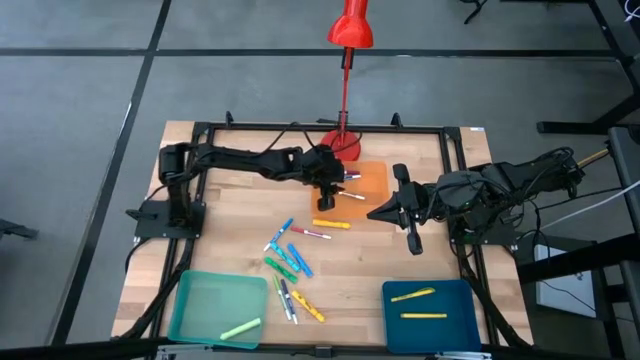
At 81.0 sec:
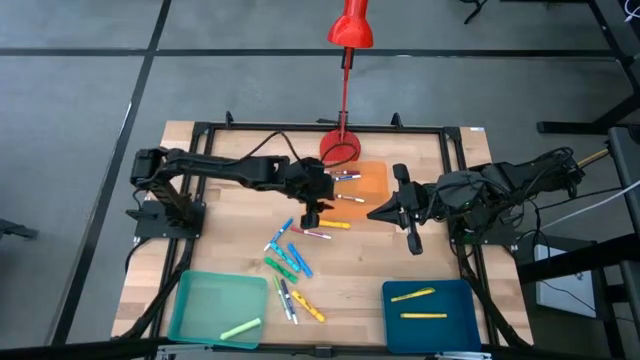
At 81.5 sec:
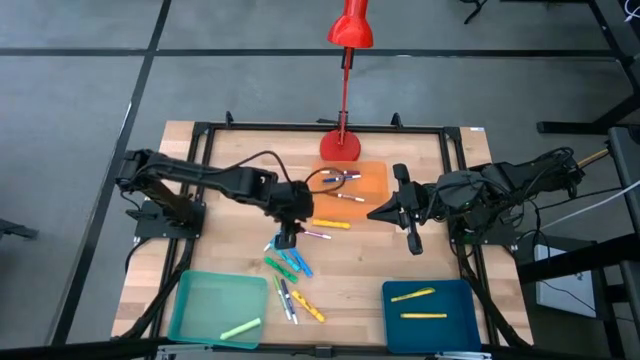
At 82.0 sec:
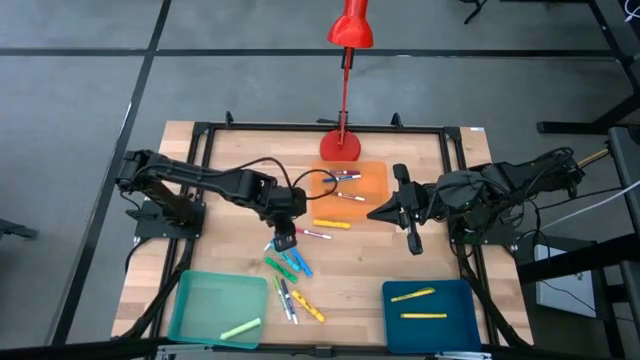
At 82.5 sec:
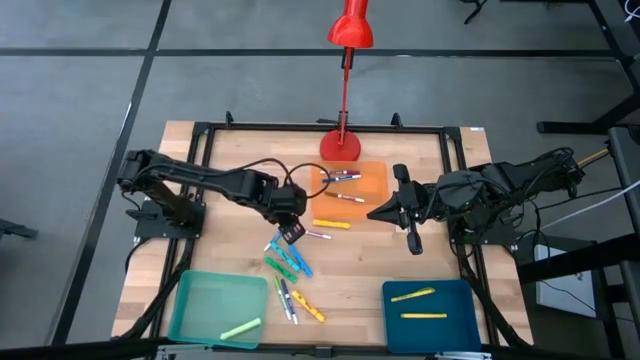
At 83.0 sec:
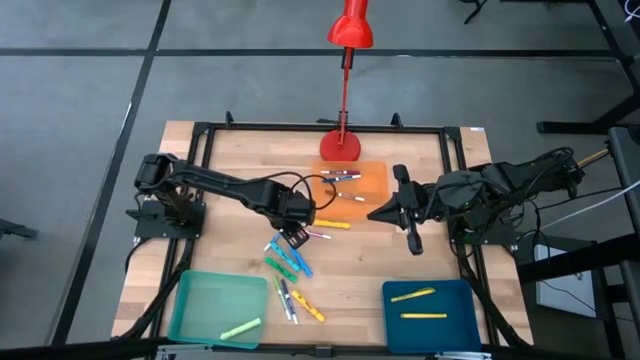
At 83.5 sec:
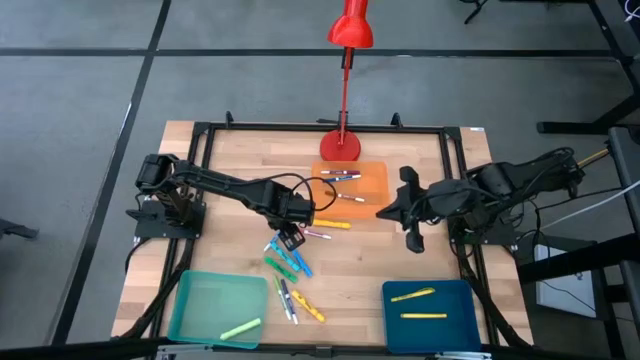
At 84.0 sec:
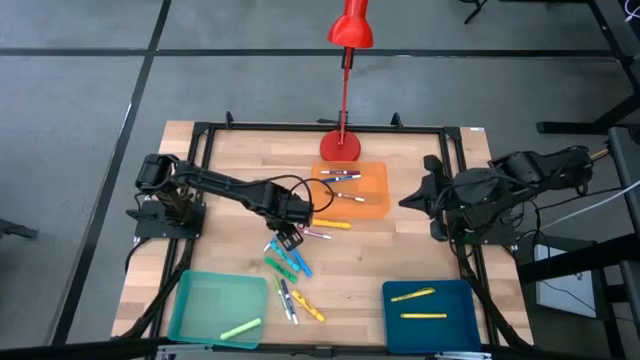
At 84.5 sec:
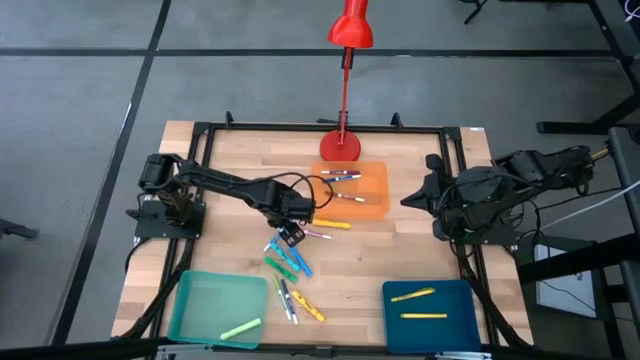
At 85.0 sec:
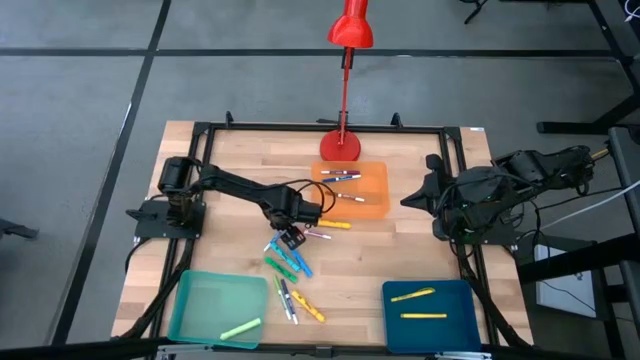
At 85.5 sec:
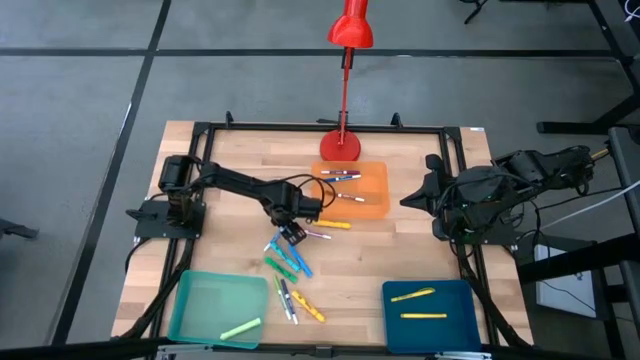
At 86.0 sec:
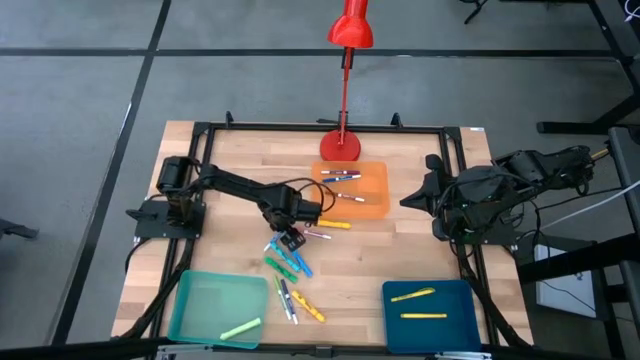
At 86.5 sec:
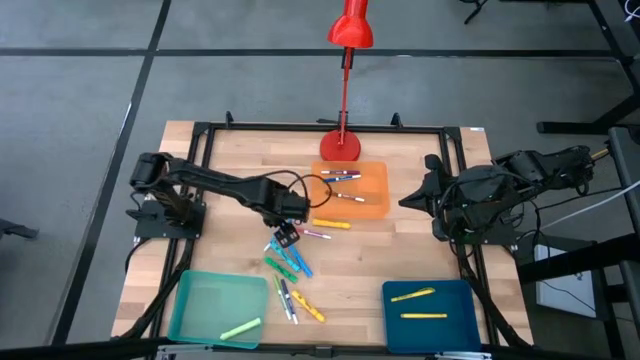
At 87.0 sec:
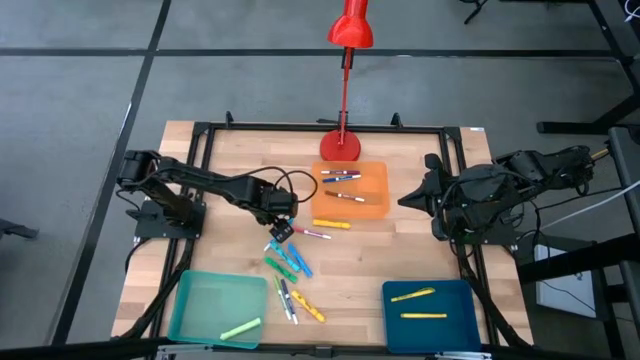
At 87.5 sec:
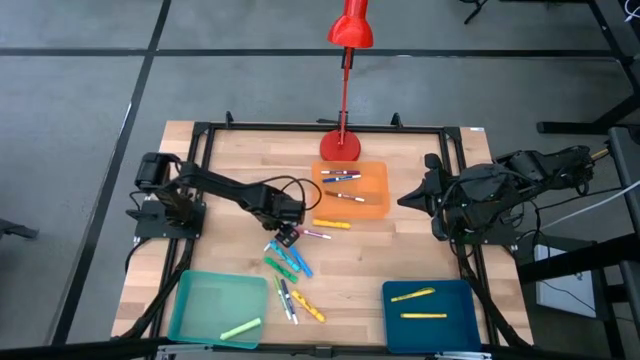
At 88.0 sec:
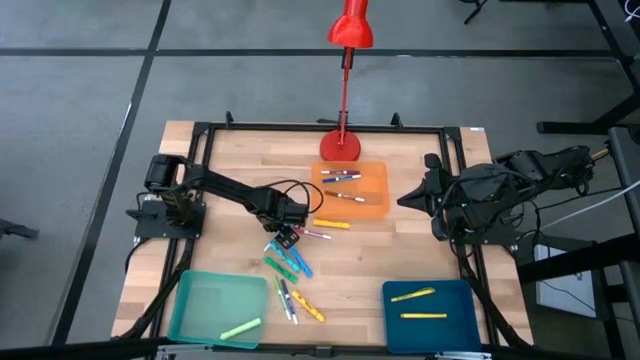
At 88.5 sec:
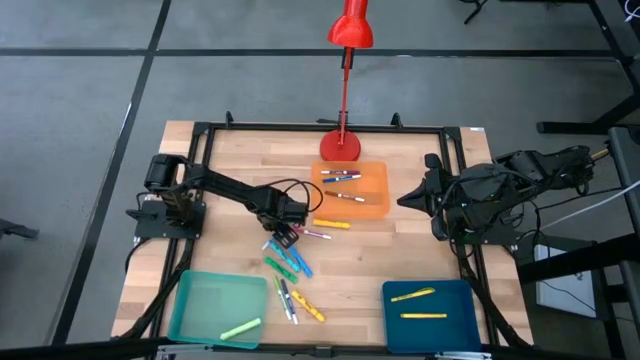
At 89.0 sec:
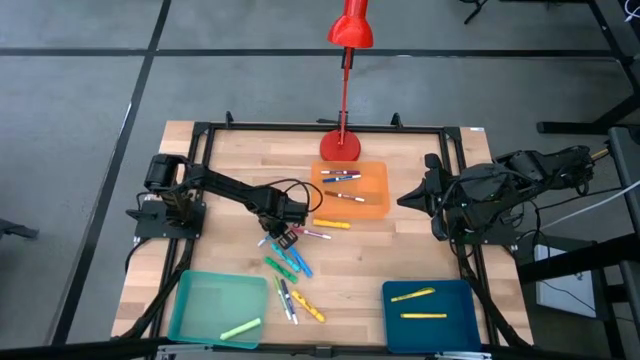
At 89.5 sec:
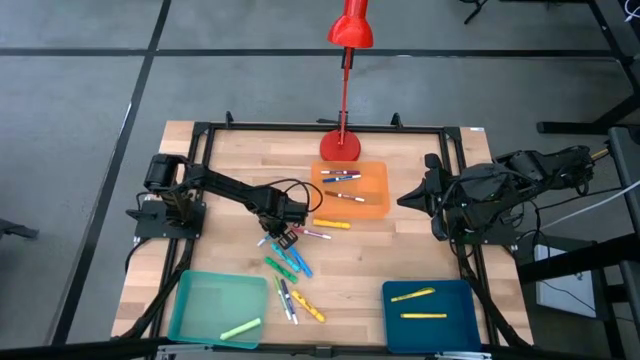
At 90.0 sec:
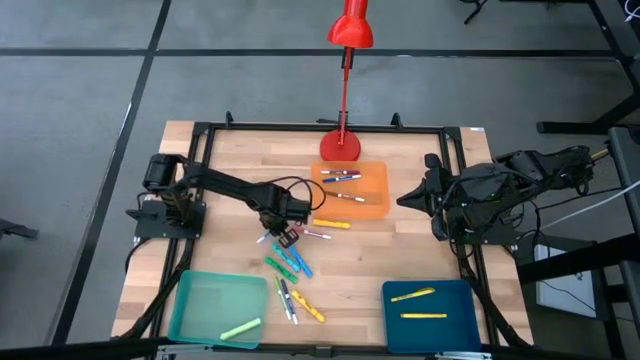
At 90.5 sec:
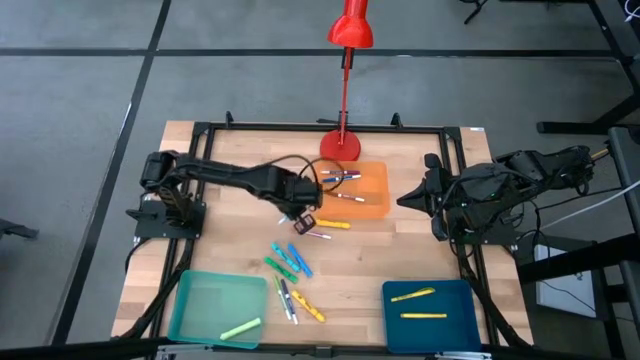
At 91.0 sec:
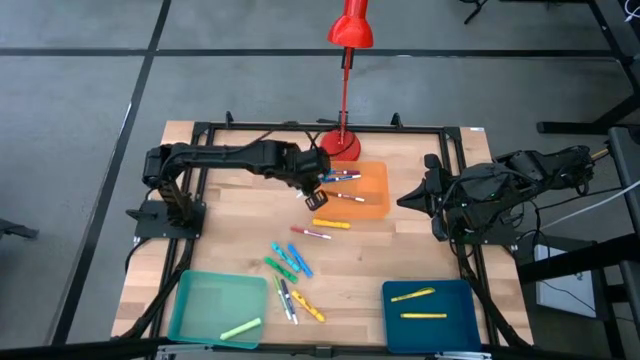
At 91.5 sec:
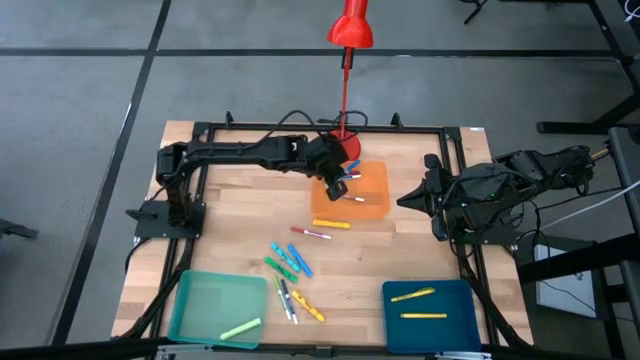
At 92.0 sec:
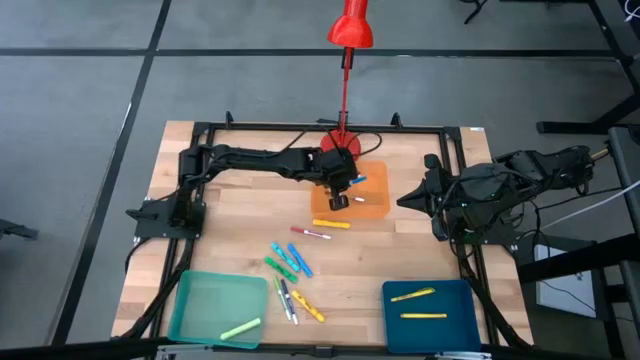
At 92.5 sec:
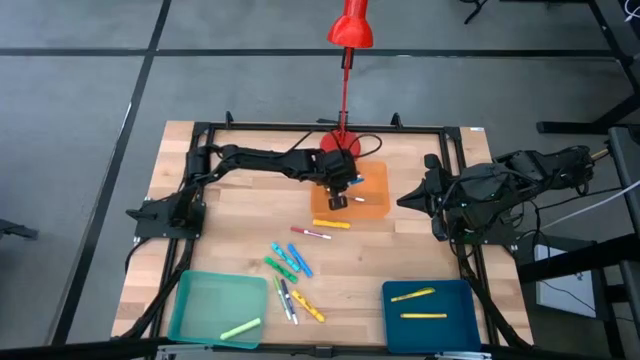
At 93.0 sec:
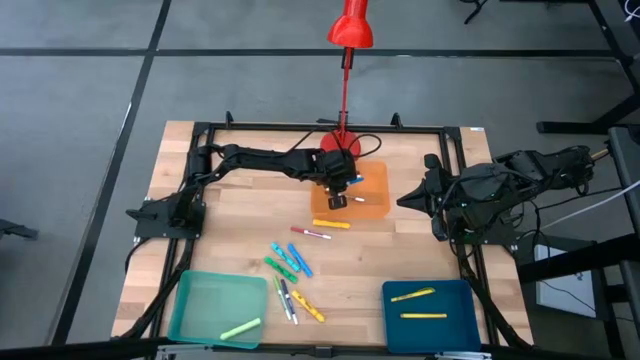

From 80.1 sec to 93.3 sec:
Task: Pick & Place Markers
Put the light blue marker pen into the orange bin

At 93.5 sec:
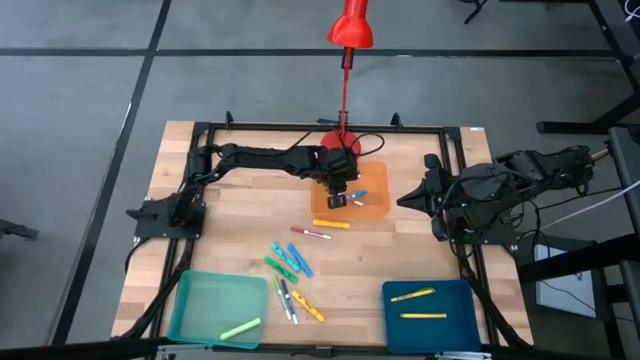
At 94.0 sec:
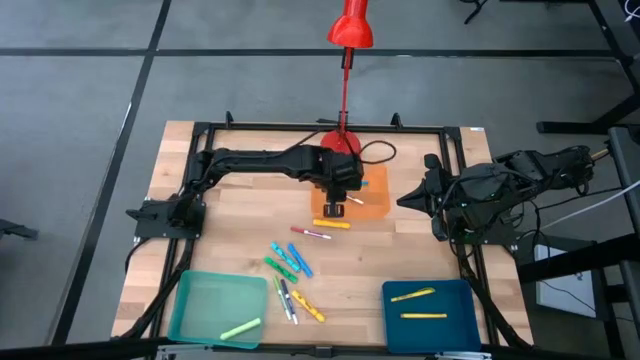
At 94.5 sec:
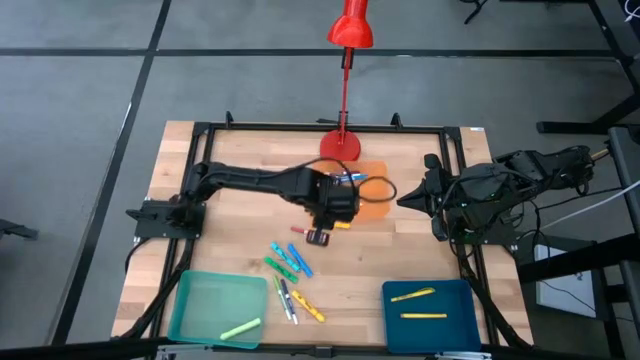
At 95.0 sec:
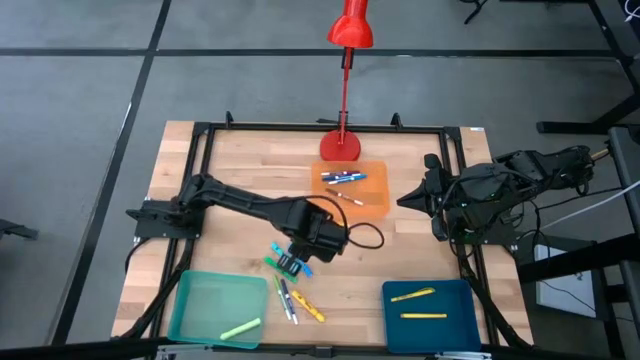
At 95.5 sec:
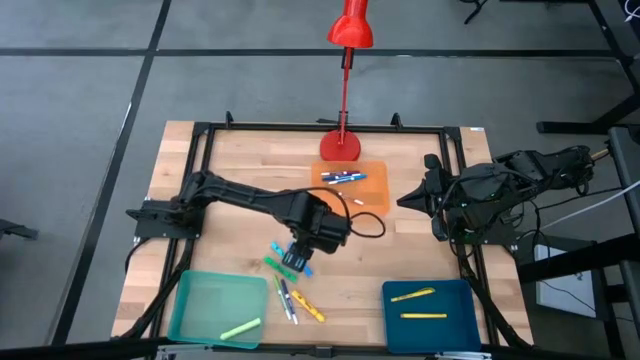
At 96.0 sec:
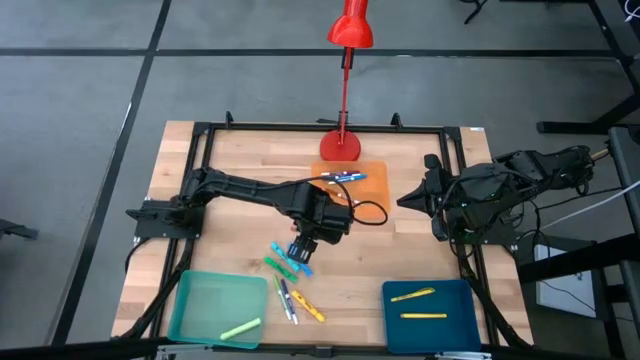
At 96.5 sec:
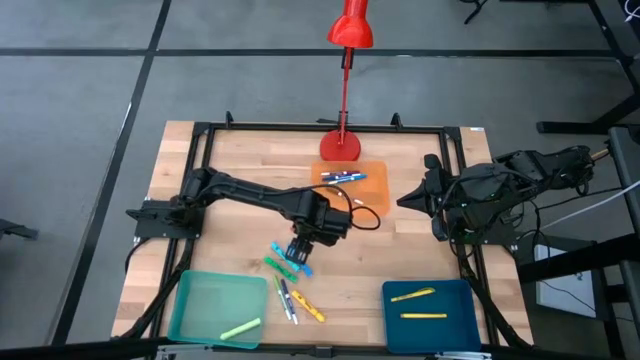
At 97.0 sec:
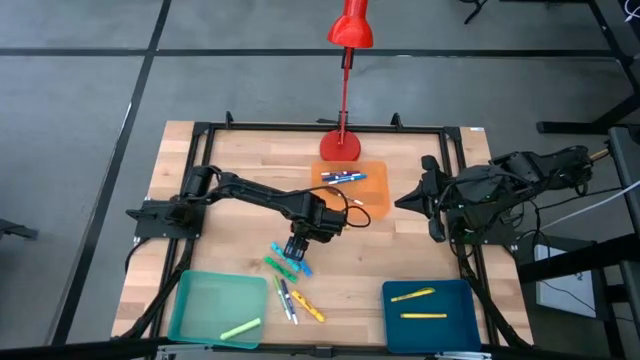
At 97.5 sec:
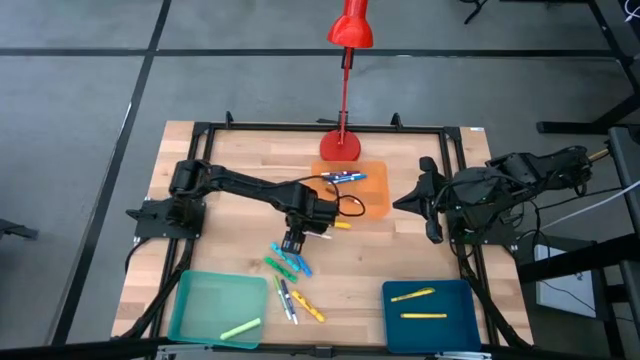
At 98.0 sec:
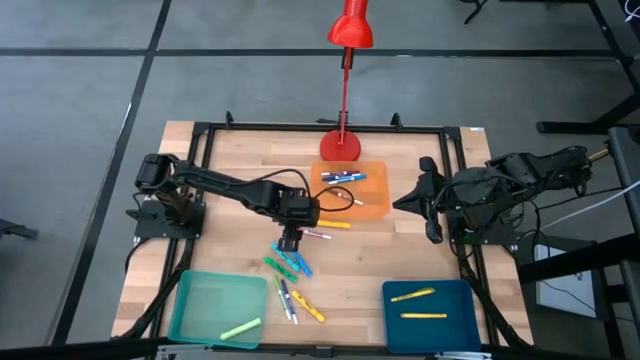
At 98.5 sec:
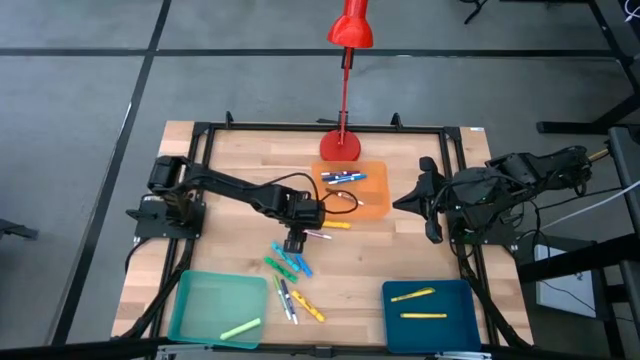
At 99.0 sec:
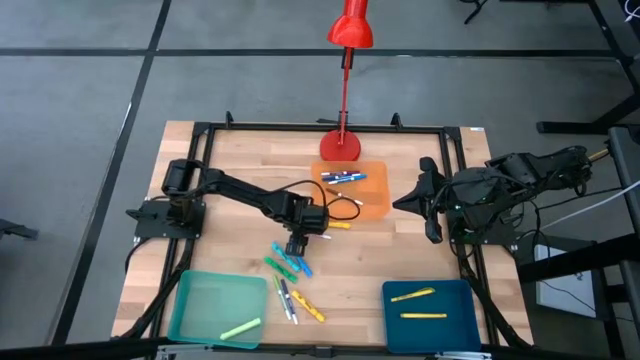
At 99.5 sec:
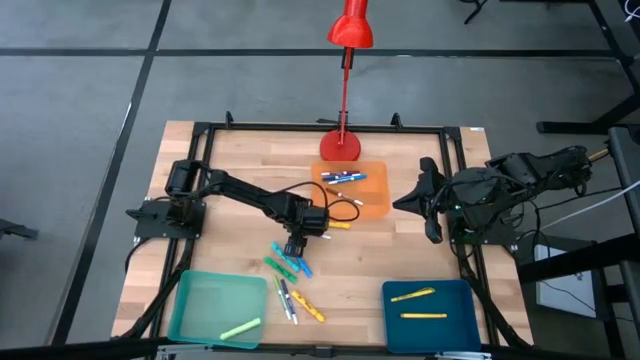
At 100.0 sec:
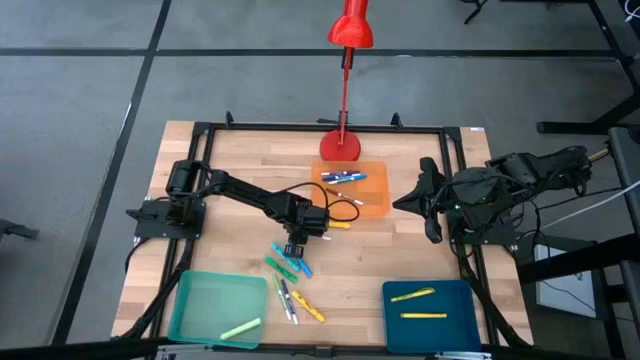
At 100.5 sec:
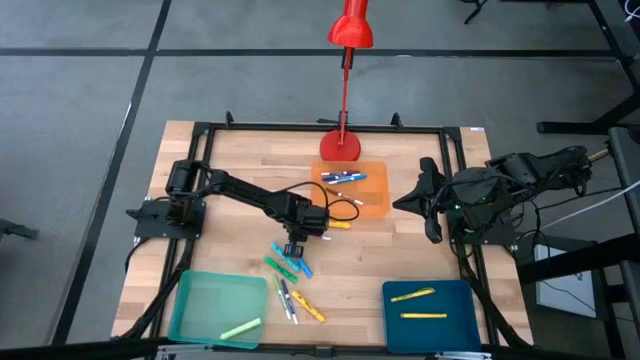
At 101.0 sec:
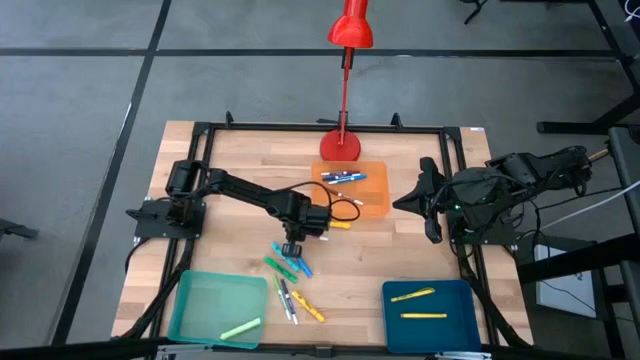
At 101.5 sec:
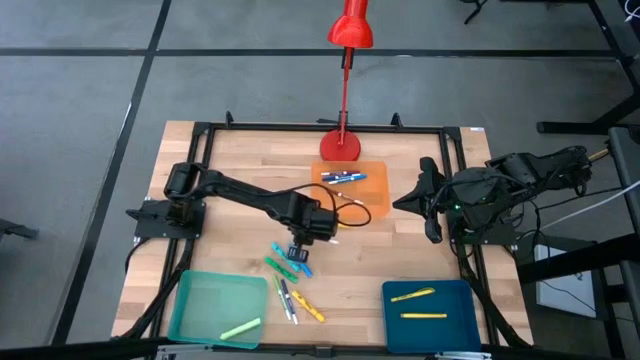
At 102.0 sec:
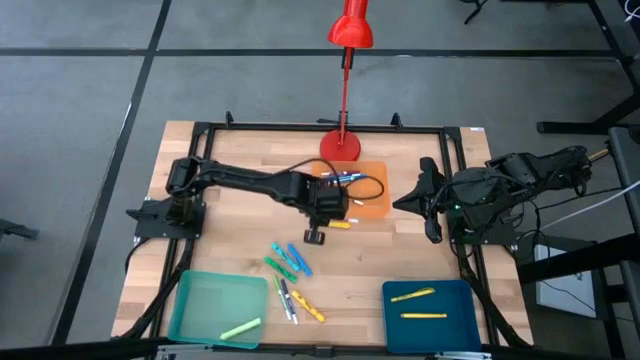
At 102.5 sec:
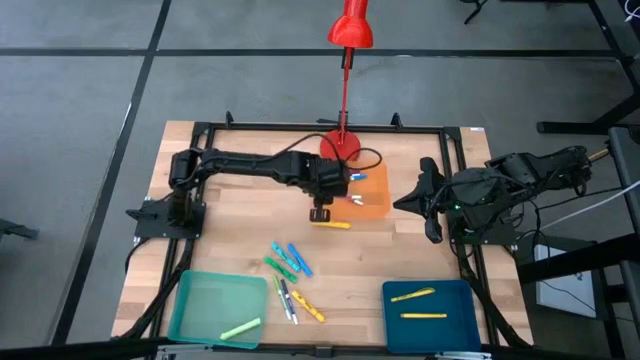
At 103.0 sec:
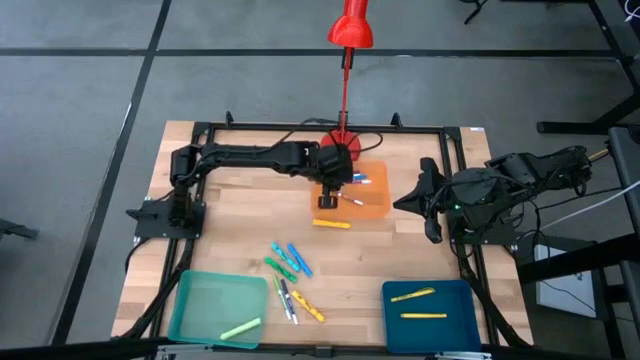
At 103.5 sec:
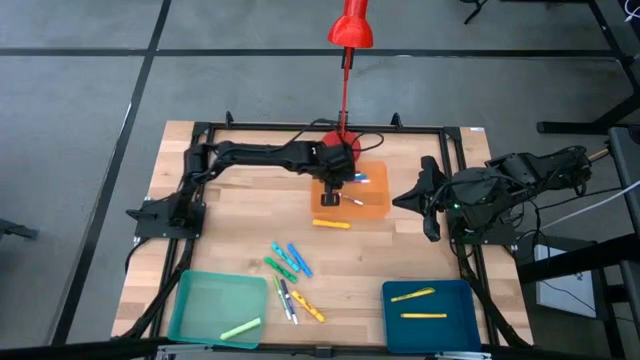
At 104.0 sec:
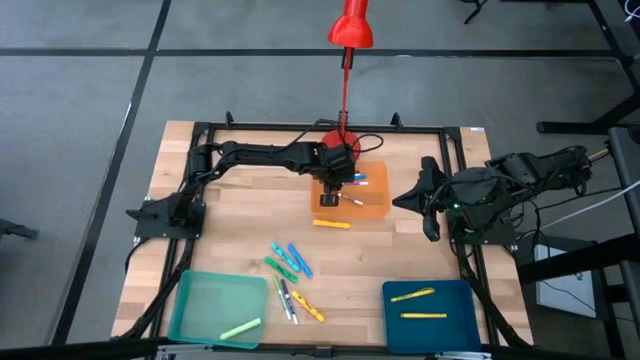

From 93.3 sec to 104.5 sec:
Put the pink marker pen into the orange bin
